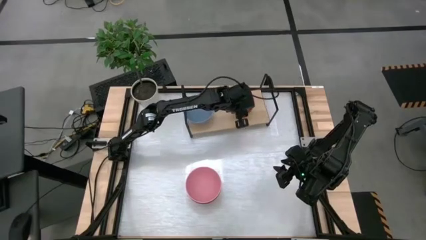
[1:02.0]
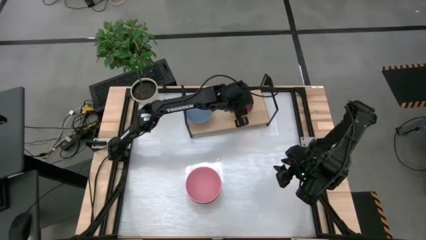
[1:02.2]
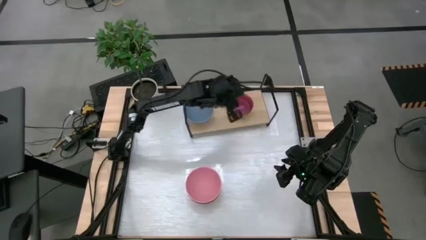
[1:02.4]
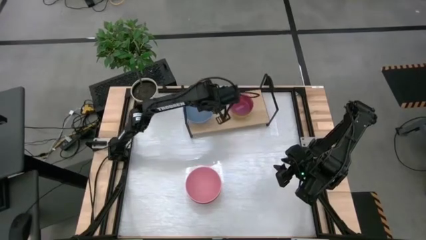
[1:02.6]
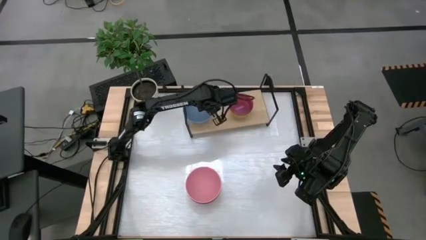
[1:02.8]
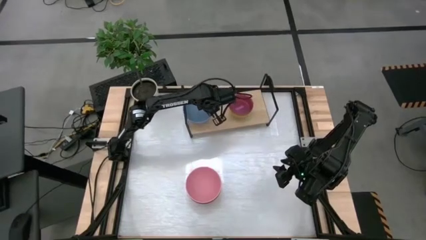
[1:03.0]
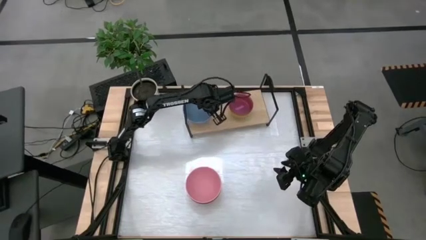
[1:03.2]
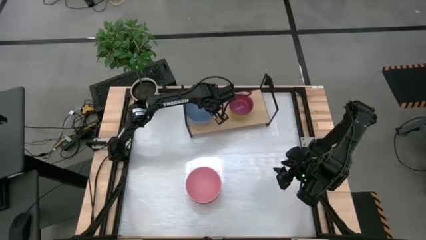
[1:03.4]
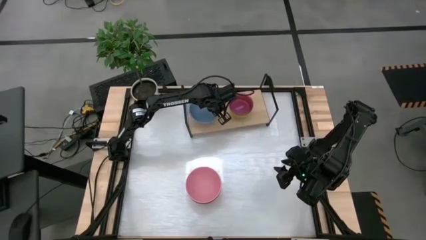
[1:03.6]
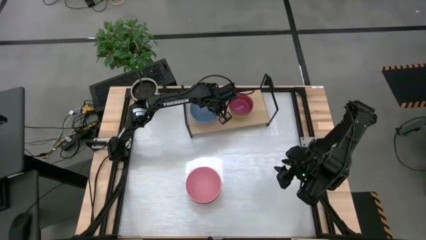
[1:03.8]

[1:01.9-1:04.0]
Task: Place and stack bowls onto a shelf
Adjust the big blue bowl on the shelf

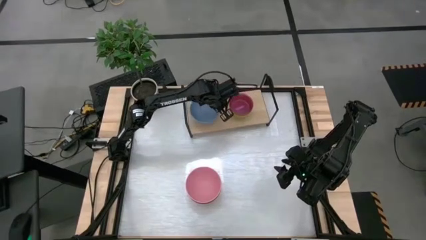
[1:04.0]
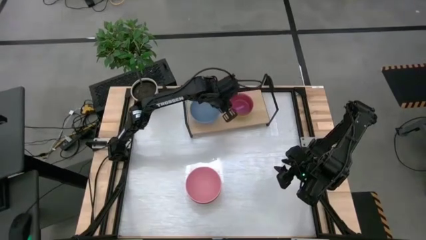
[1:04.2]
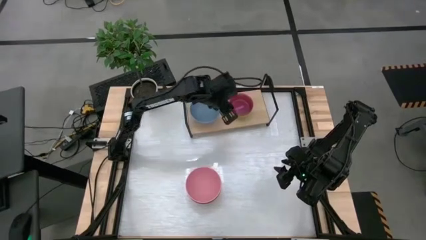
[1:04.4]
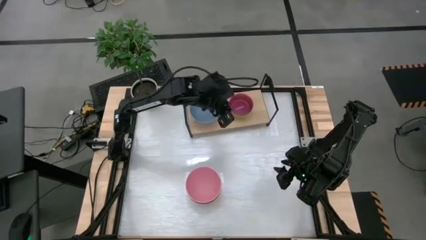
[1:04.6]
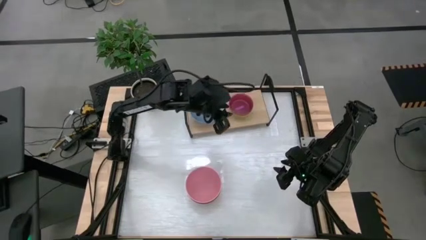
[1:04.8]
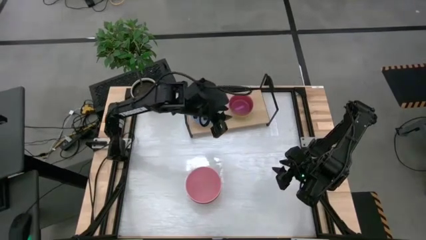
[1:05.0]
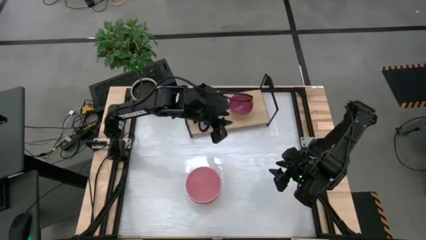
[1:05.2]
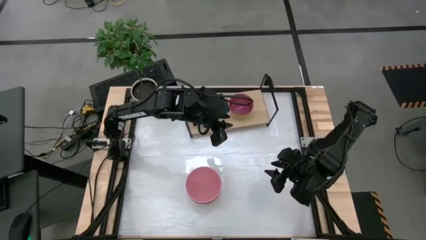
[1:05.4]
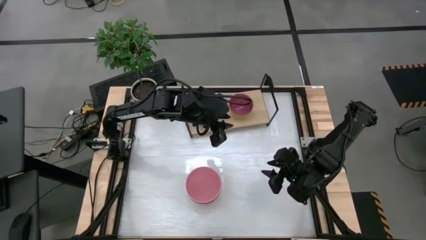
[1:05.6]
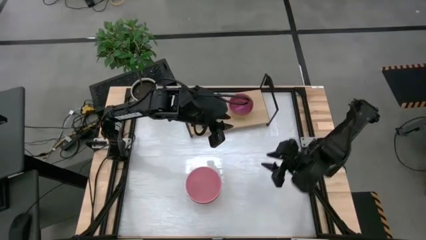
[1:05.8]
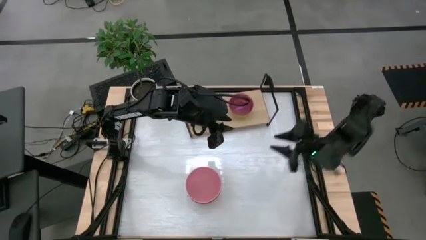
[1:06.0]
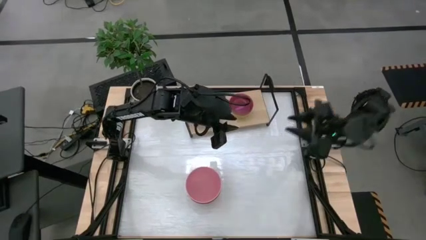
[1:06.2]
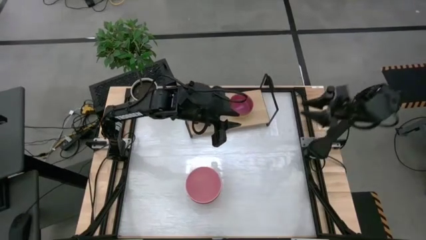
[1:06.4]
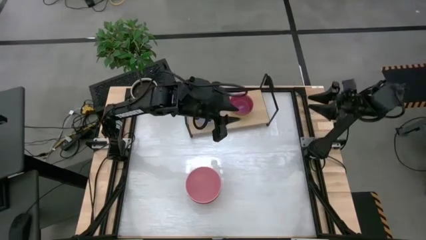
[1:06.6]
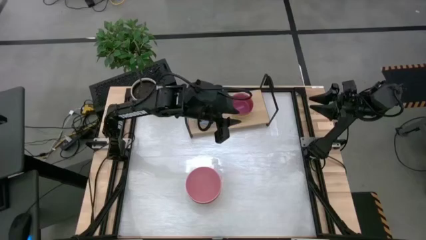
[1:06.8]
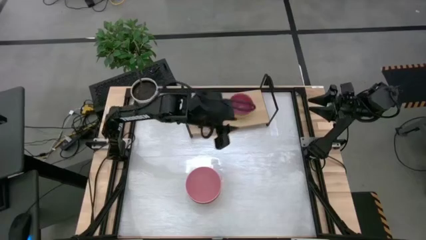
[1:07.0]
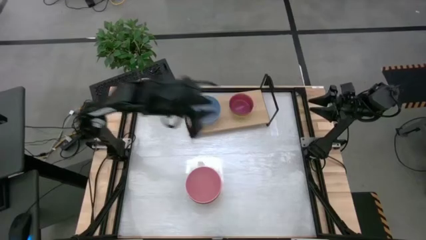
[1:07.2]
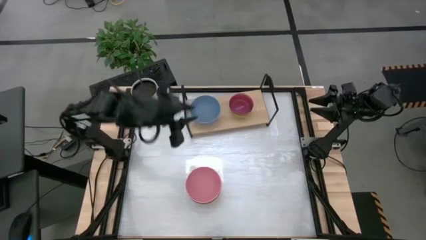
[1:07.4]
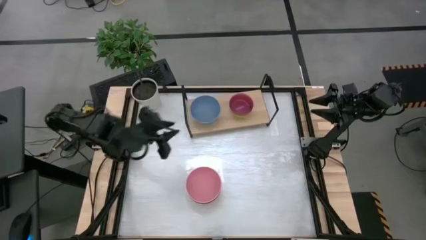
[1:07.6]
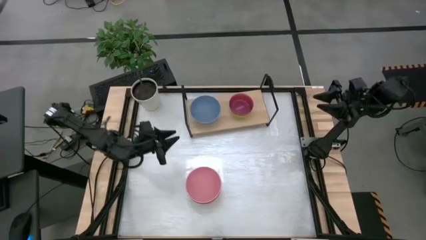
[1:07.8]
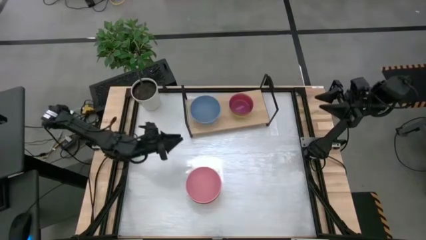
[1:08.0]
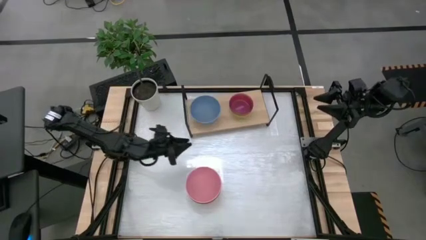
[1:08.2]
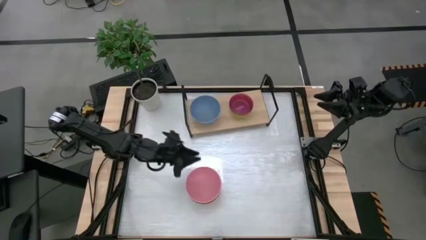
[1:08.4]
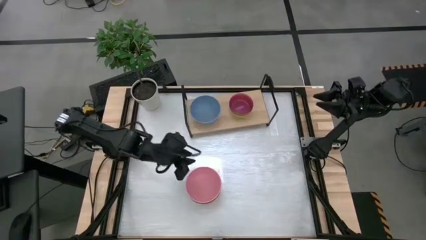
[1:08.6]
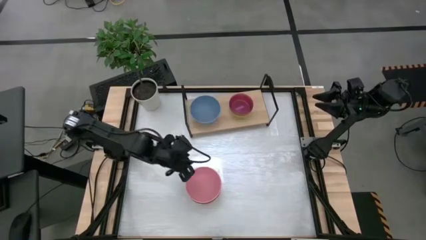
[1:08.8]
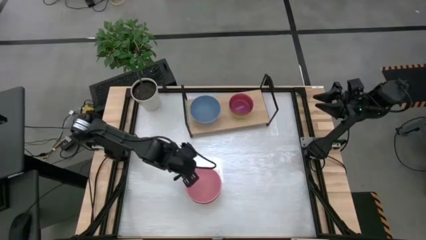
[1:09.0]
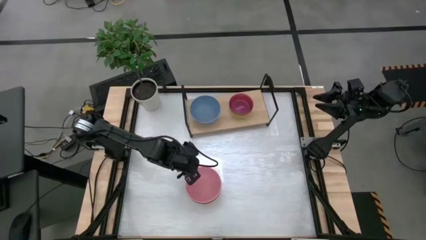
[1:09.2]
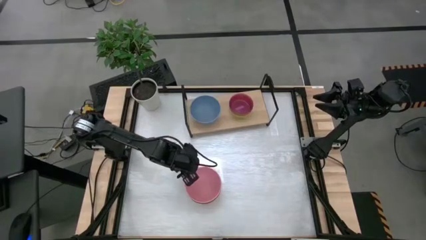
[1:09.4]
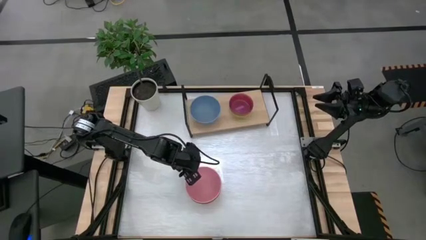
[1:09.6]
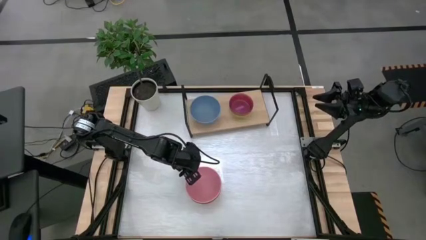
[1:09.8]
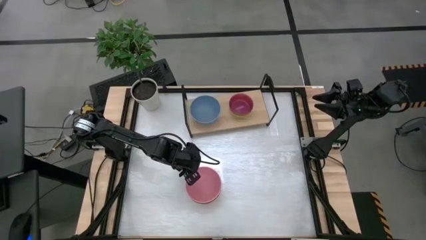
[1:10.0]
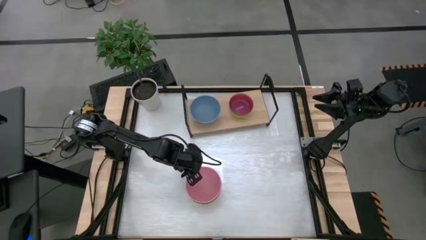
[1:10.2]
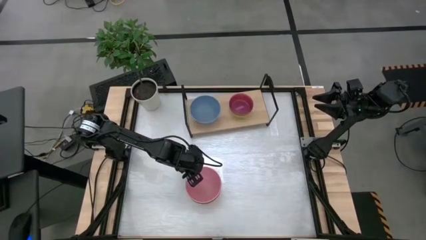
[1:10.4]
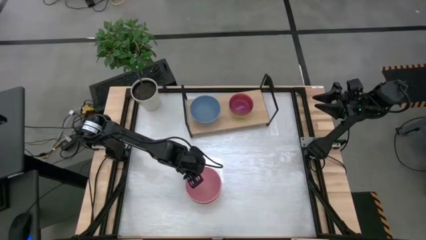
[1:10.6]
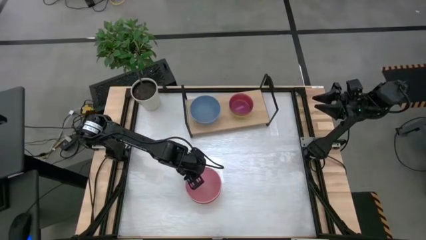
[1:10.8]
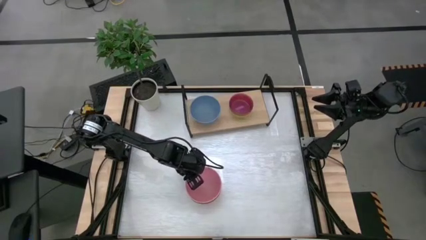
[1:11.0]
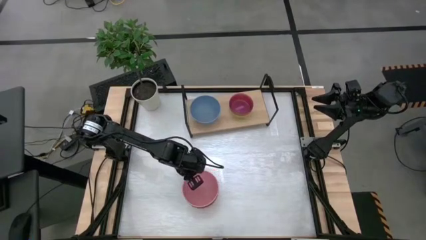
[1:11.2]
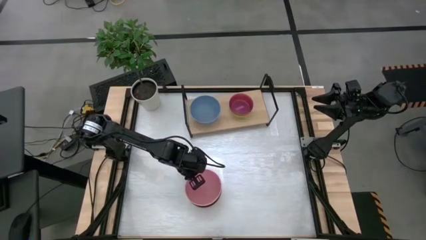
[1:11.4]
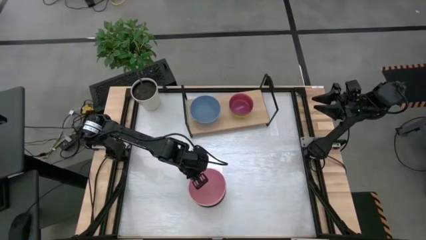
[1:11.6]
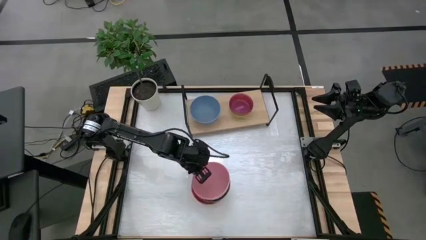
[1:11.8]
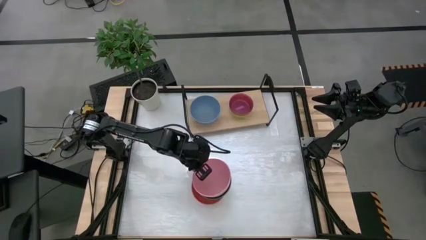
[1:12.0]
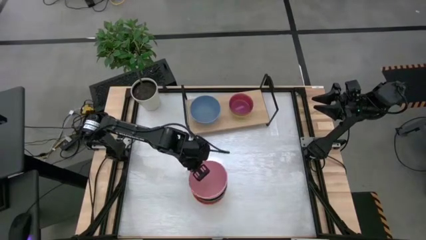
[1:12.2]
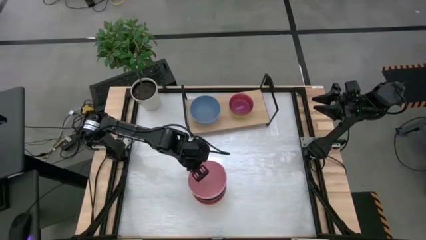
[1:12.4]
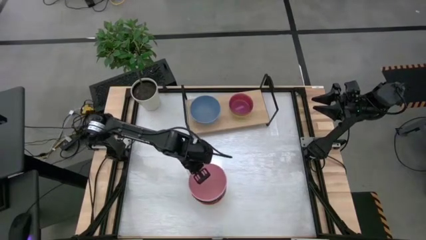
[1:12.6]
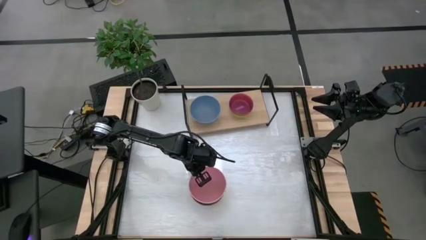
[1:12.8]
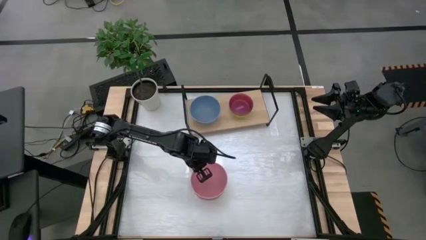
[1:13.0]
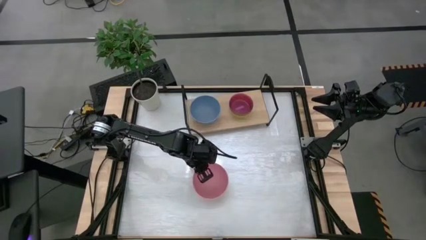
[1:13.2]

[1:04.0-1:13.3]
Stack the big pink bowl on top of the big blue bowl on the shelf
